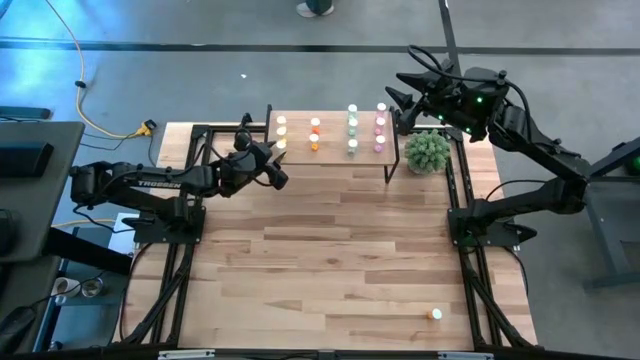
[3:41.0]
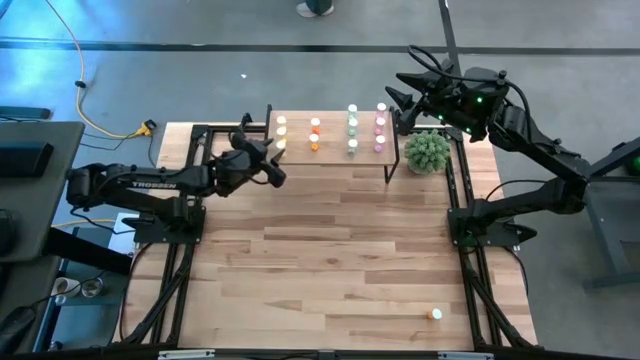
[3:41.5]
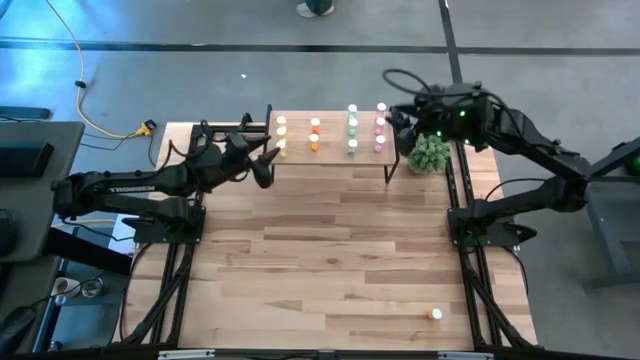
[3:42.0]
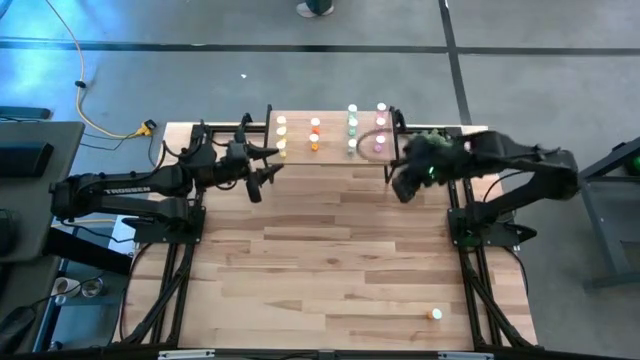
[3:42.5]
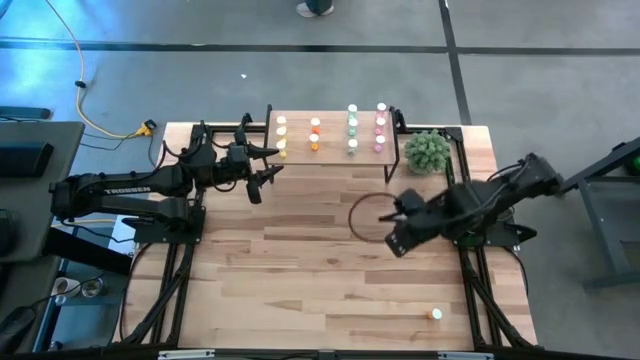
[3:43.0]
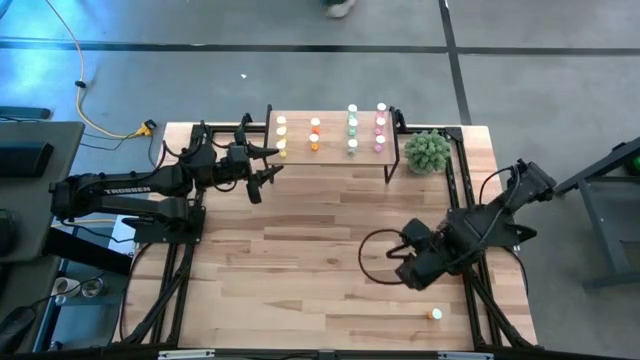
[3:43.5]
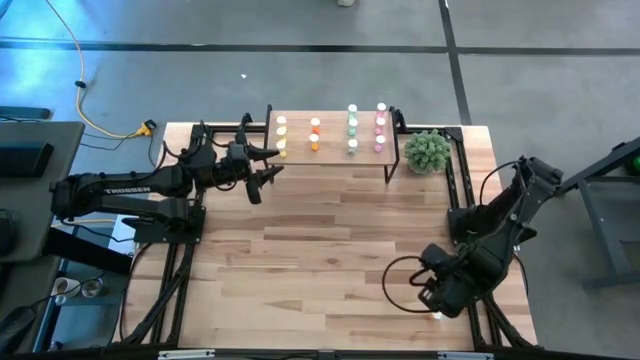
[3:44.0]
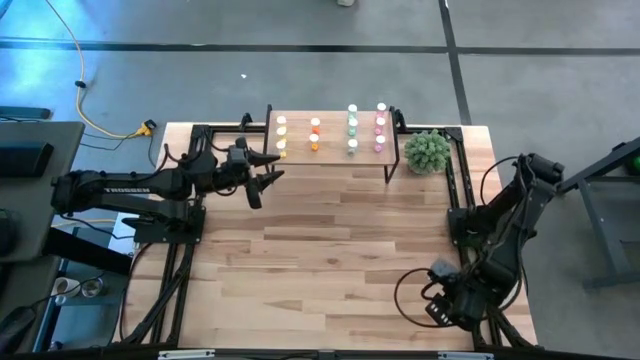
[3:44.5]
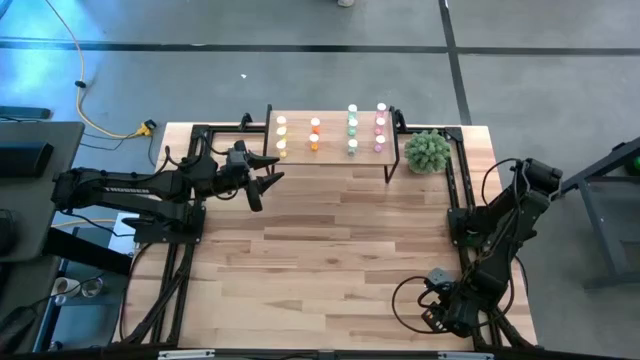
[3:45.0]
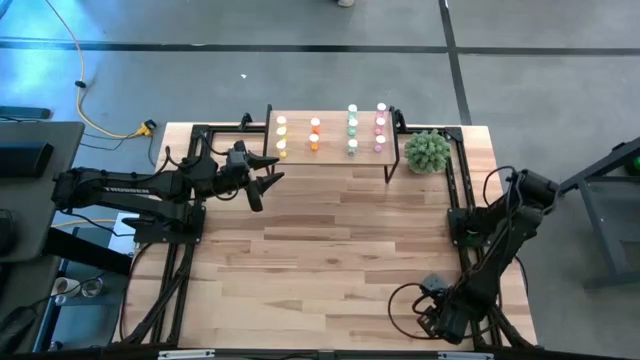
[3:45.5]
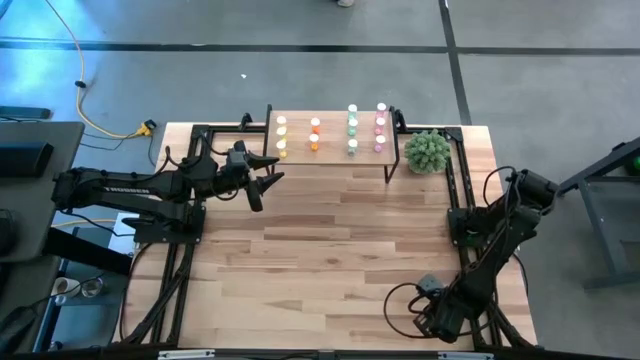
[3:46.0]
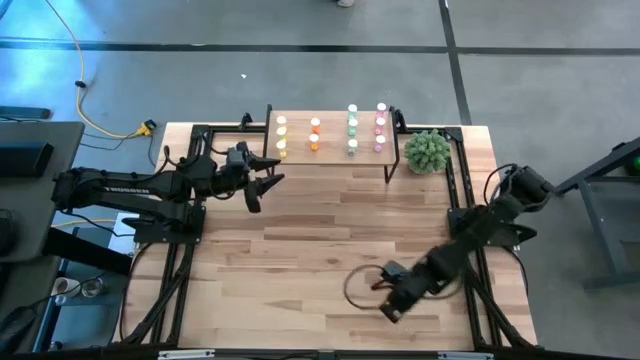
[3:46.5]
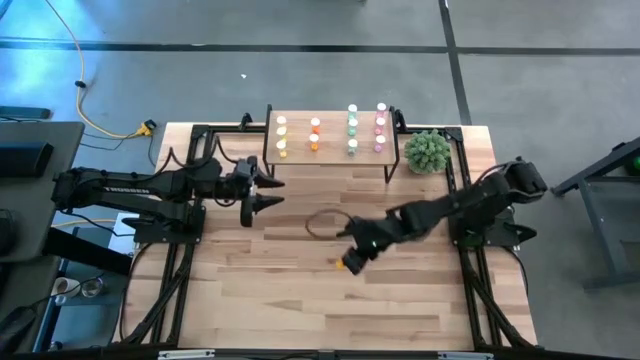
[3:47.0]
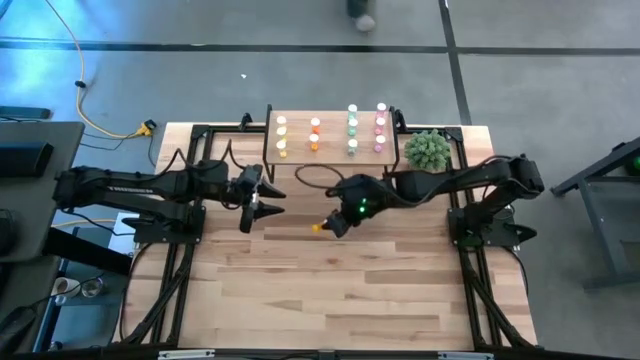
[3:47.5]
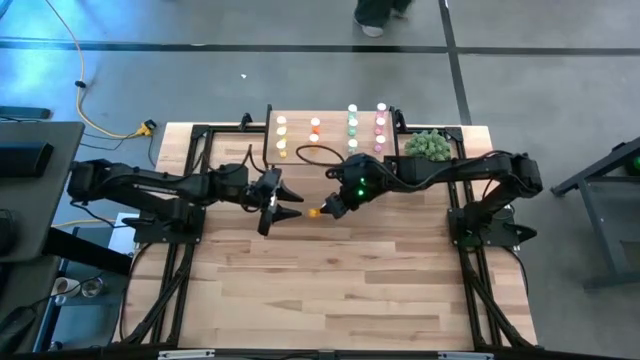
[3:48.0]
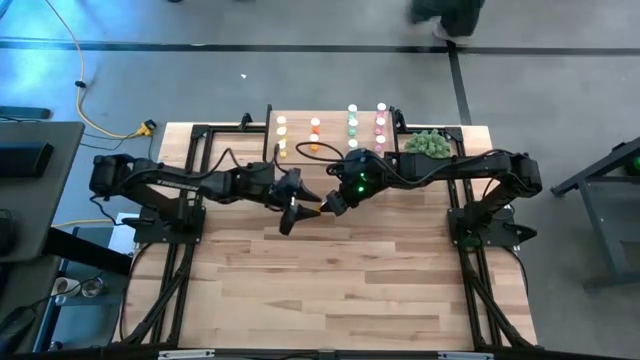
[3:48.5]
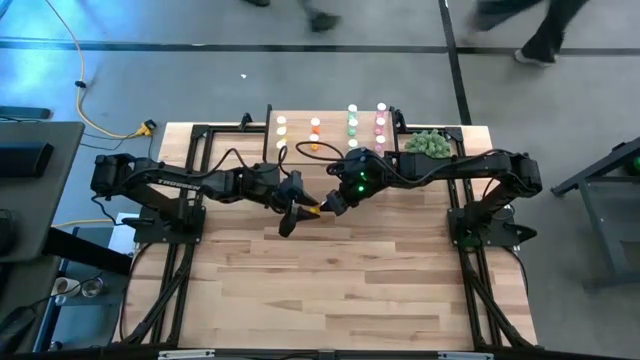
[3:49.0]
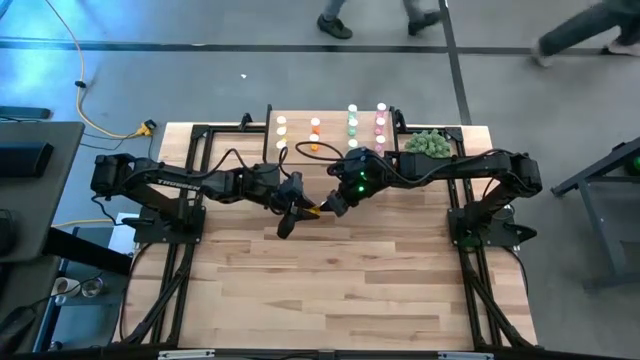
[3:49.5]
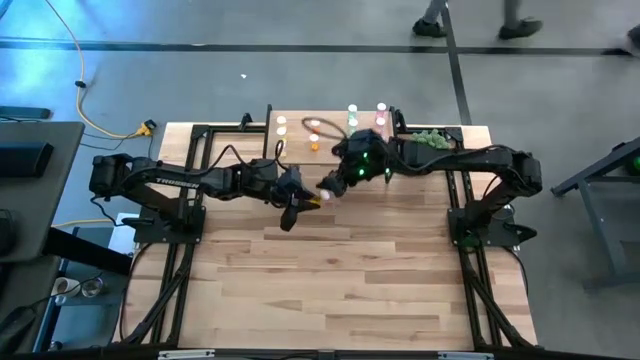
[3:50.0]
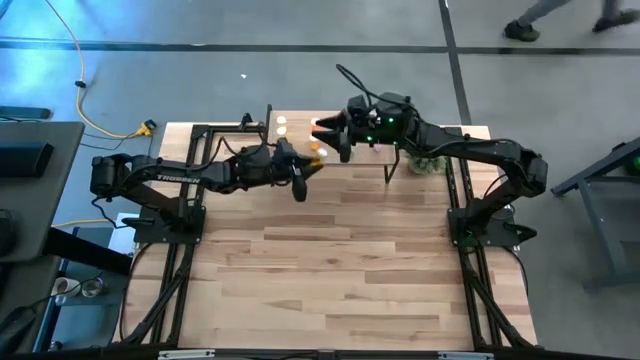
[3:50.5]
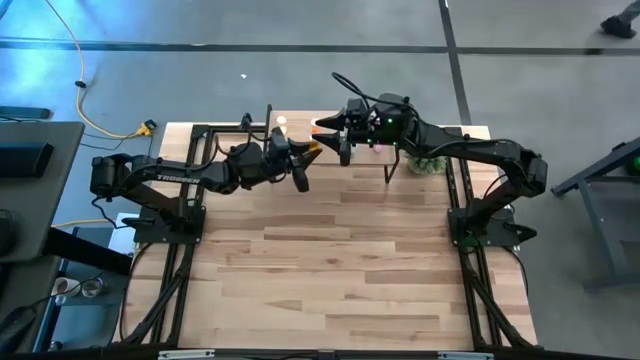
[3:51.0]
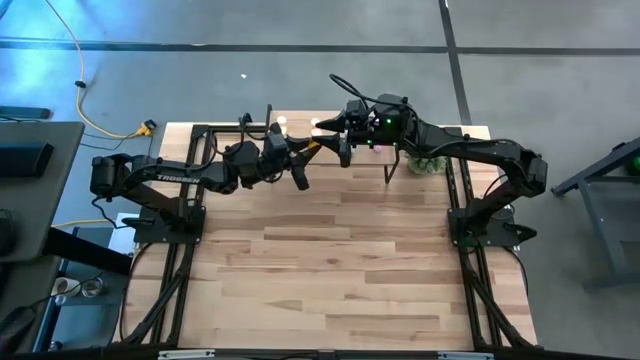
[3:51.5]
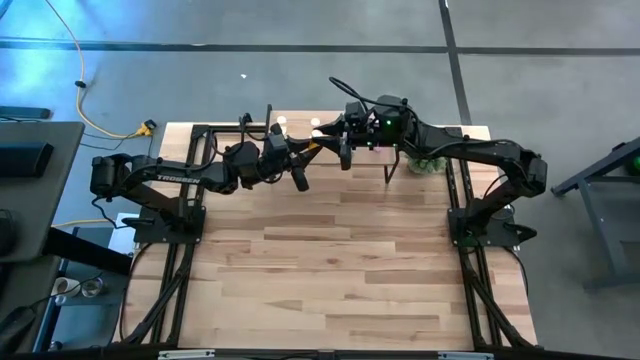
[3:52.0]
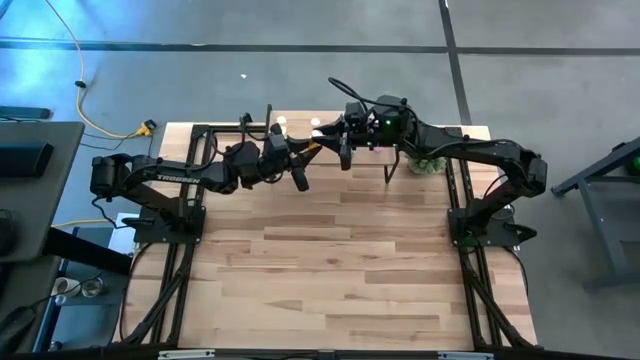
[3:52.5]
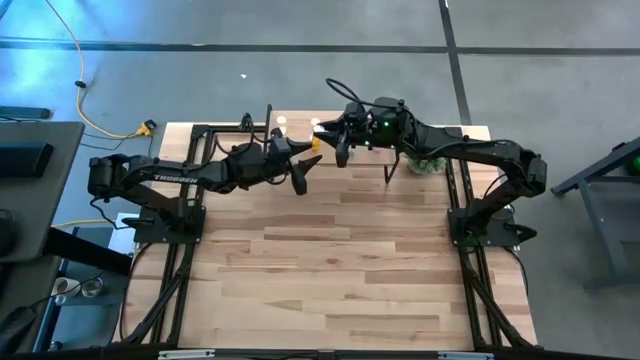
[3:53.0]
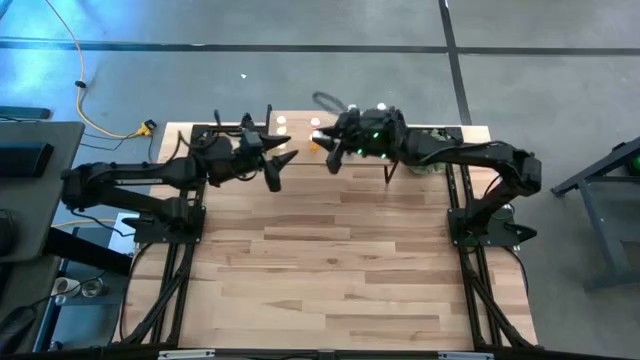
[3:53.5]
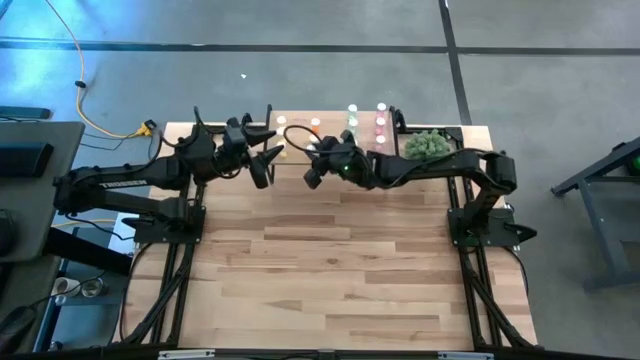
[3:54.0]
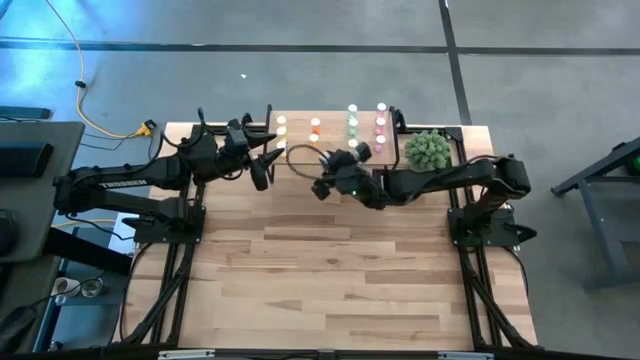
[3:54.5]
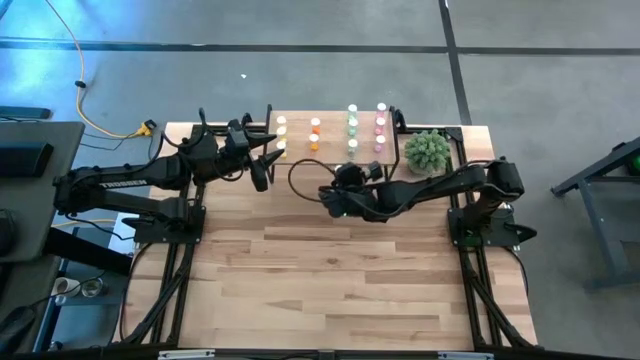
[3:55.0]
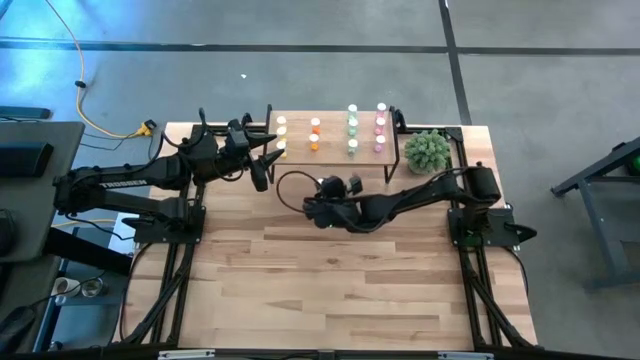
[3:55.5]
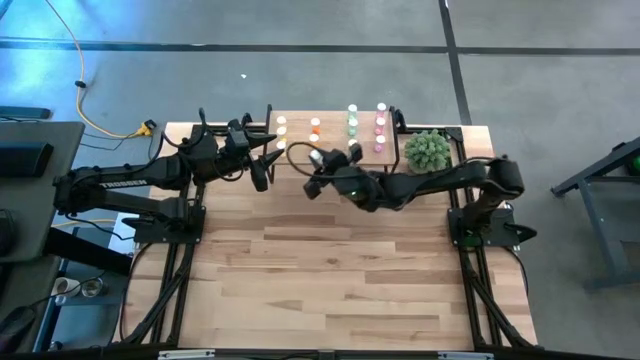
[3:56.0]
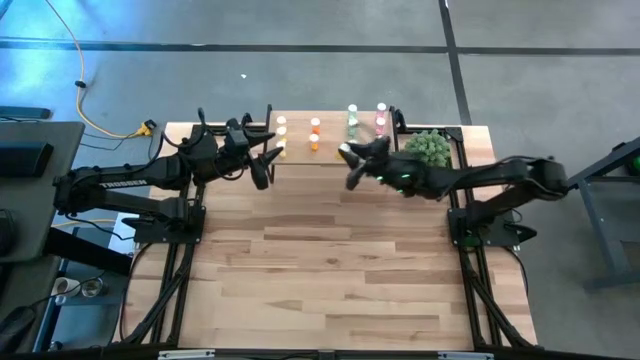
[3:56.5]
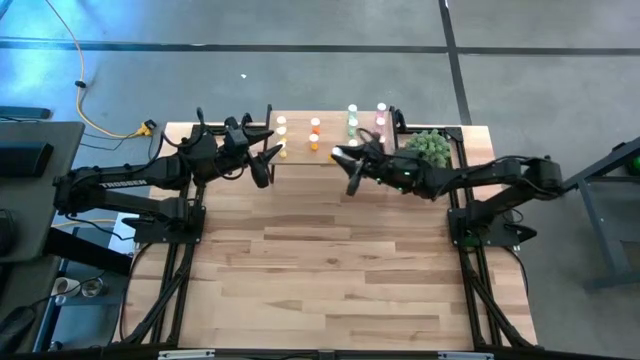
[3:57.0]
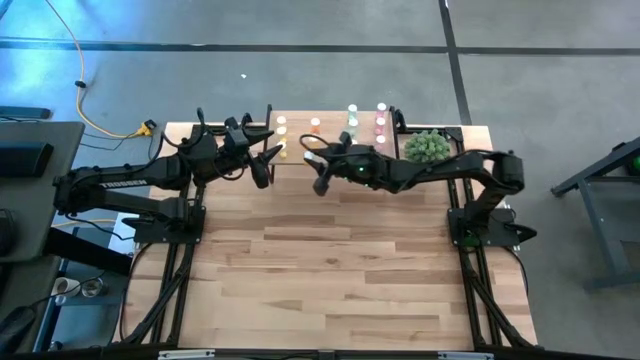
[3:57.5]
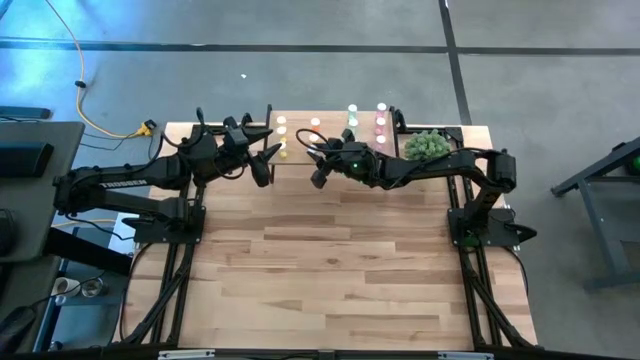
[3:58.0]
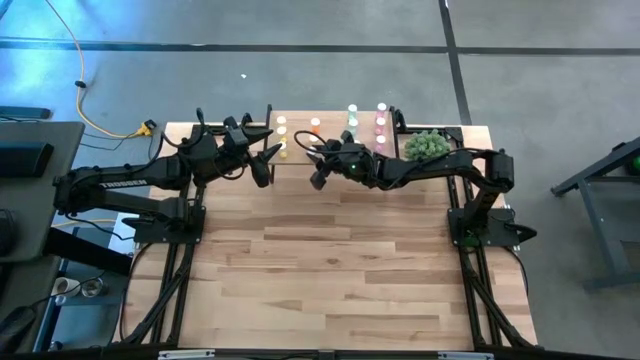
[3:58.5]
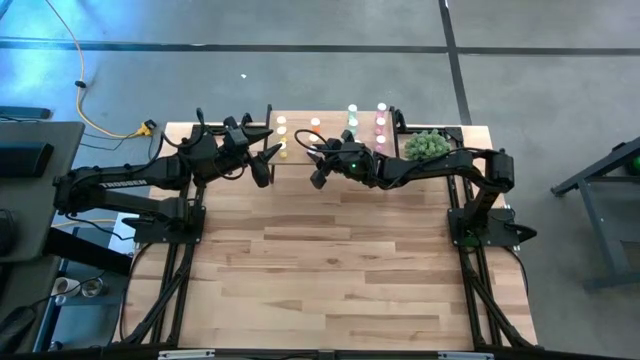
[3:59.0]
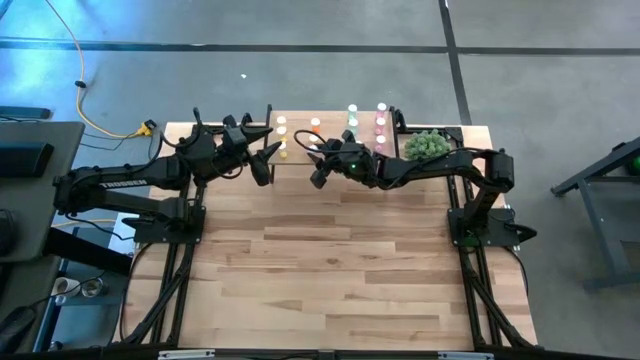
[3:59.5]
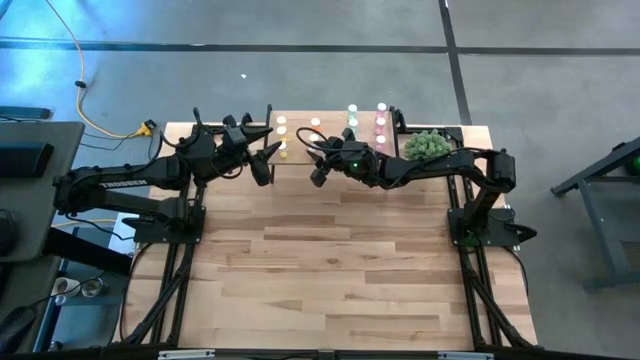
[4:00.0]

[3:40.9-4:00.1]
Task: Pick and place medicine bottles onto shelf by color
Put the orange pill bottle on the shelf aligned with the other orange pill bottles

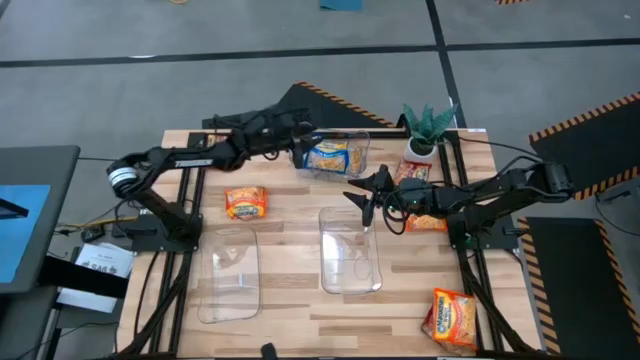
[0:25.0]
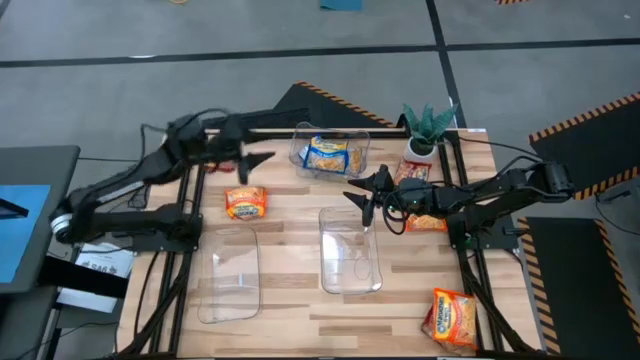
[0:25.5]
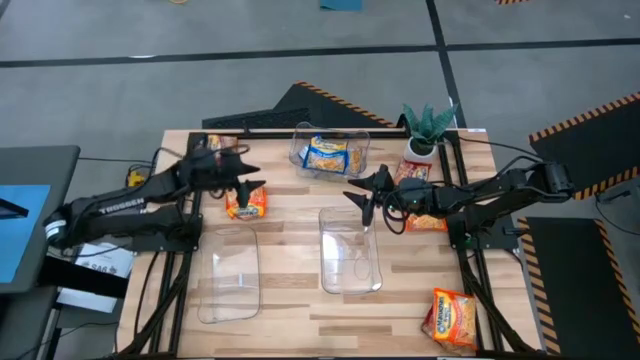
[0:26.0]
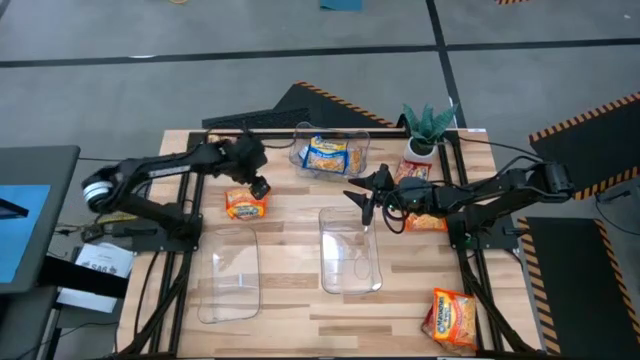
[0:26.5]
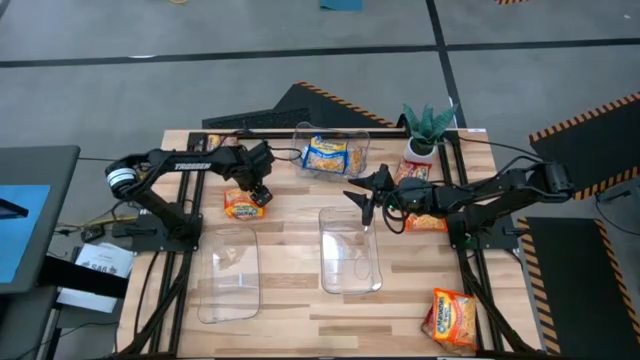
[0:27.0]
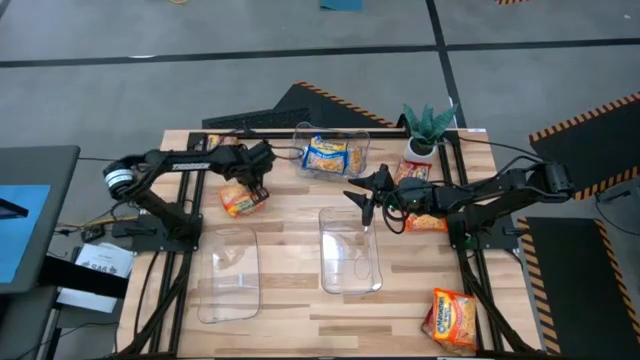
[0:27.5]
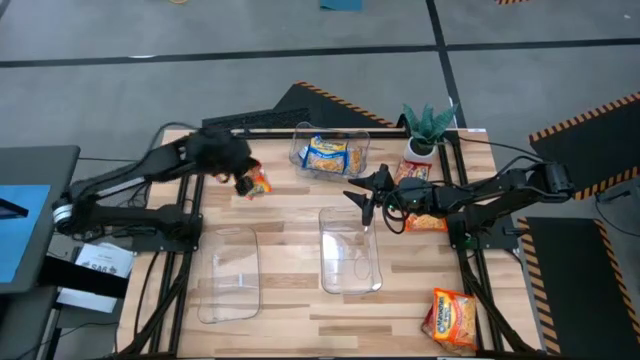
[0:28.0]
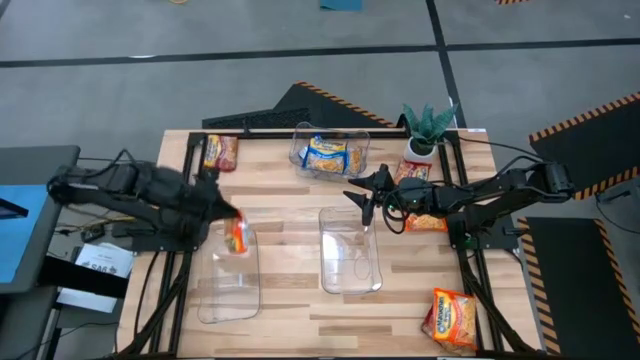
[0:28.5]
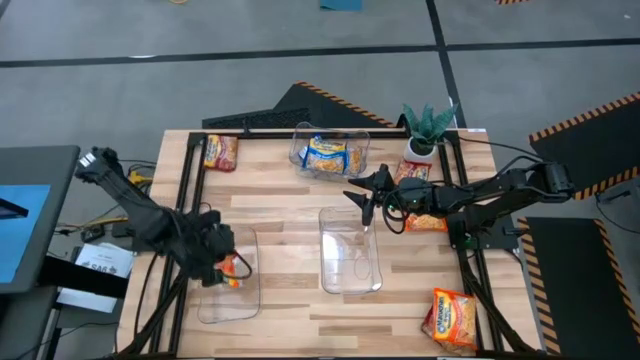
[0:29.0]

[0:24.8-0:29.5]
Task: Sort Maruchan noodles
Put the top left orange noodle pack into the bottom left transparent bin
